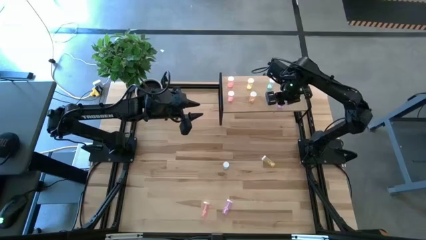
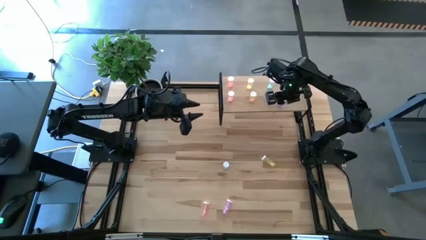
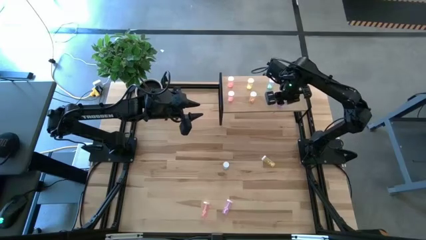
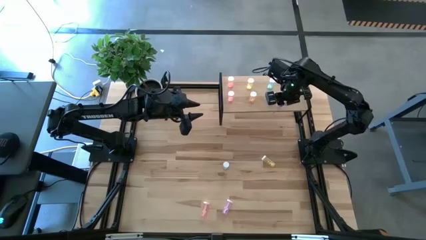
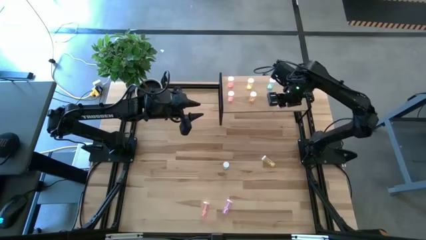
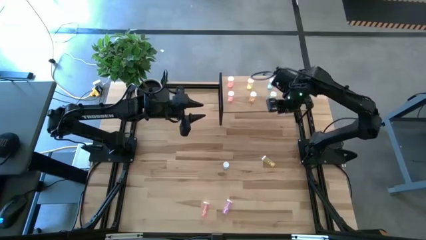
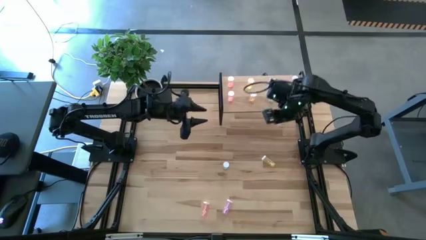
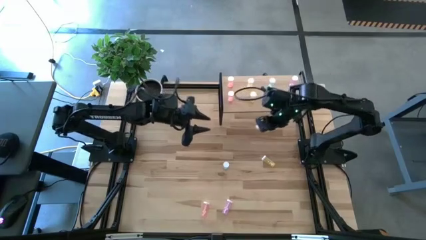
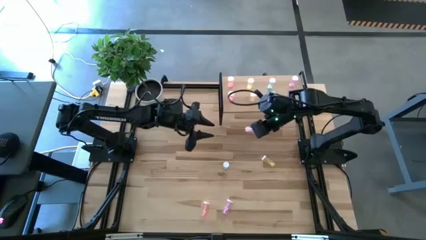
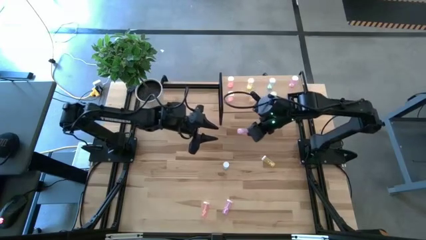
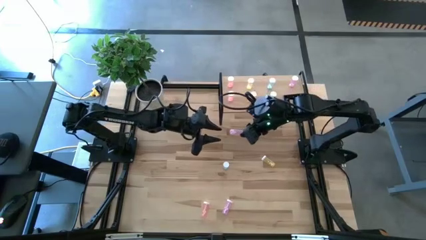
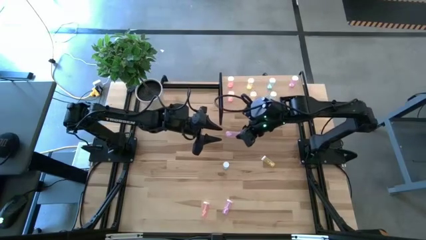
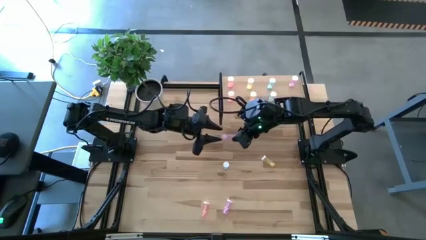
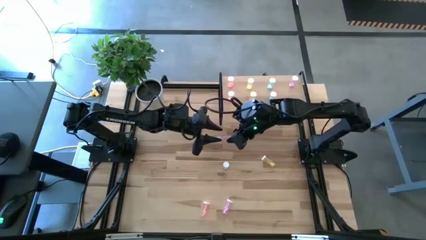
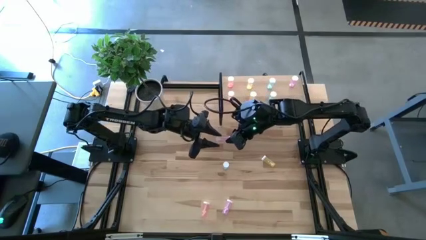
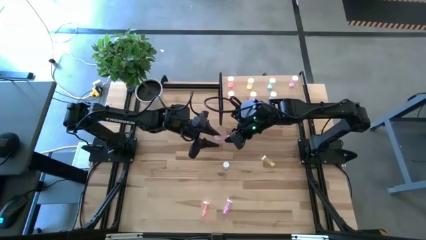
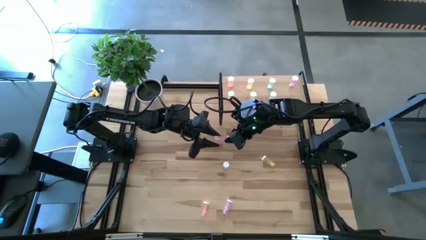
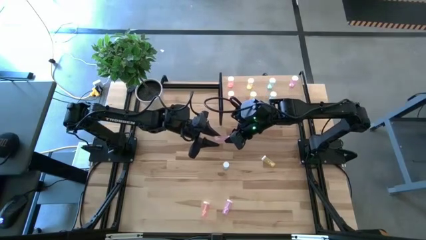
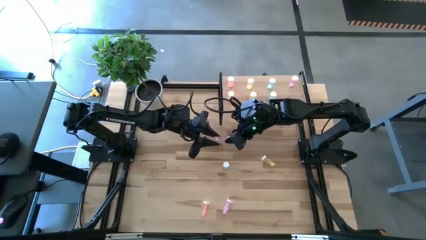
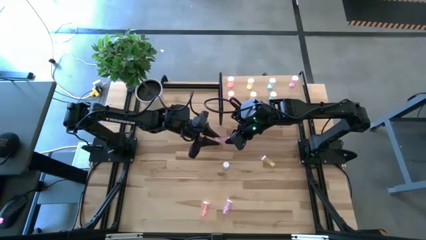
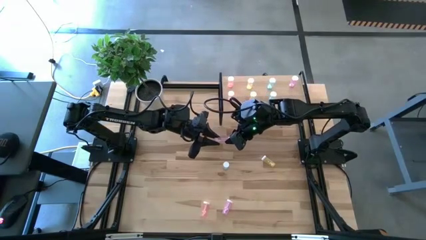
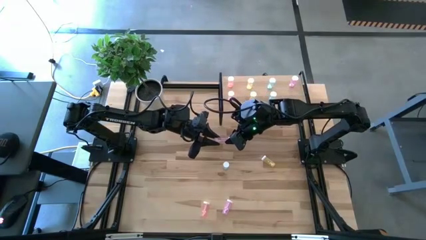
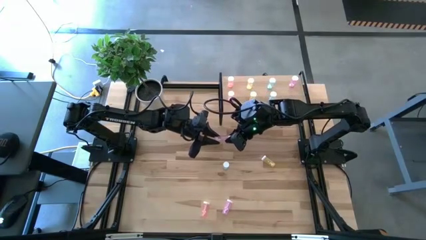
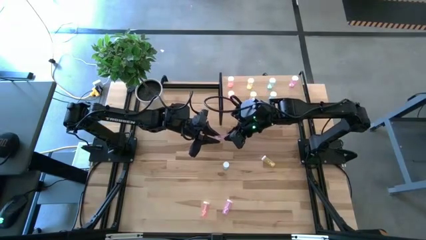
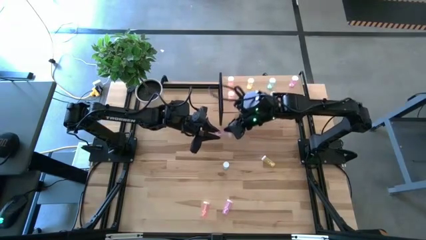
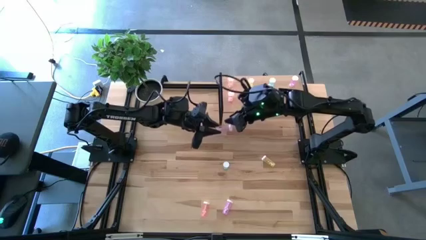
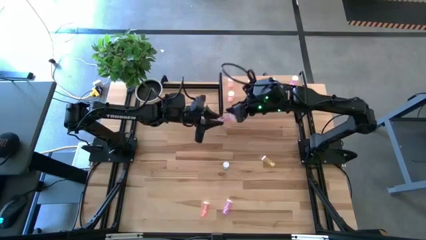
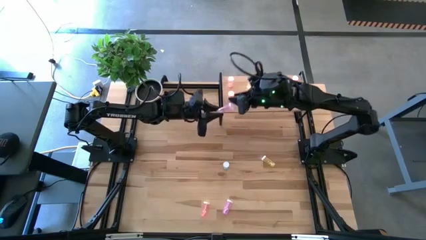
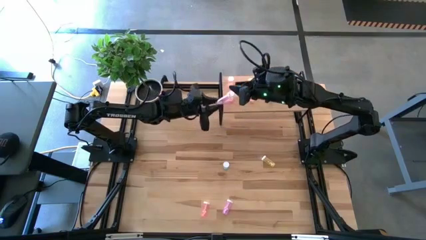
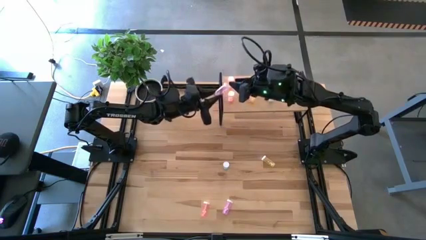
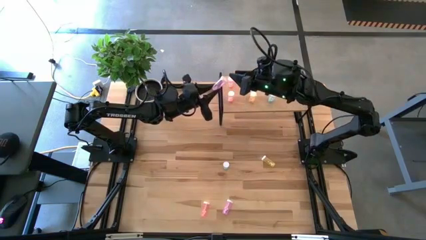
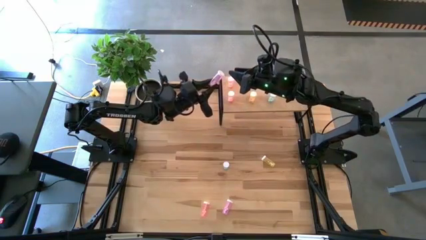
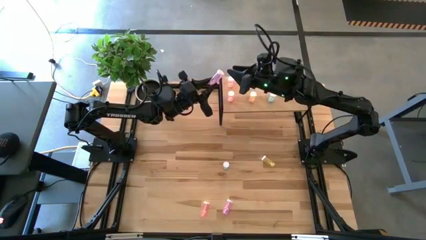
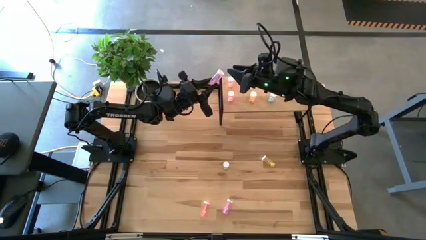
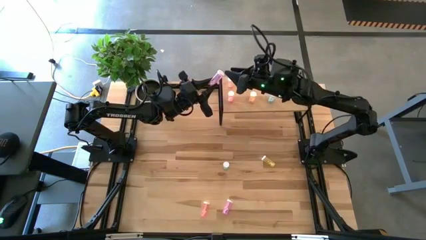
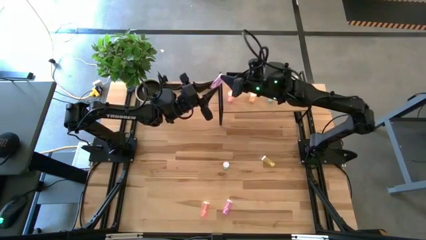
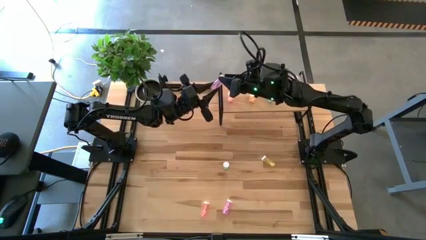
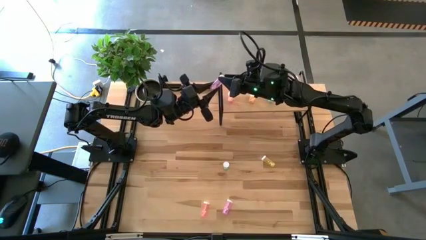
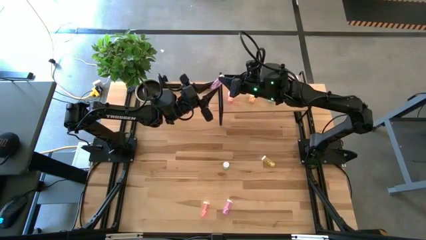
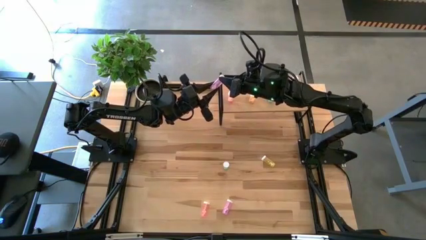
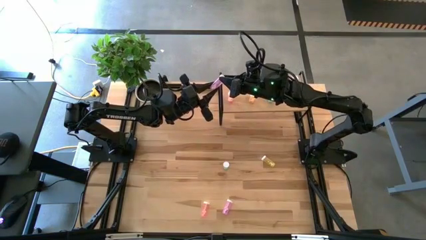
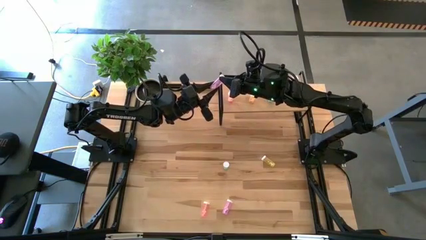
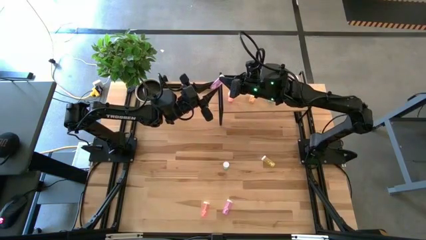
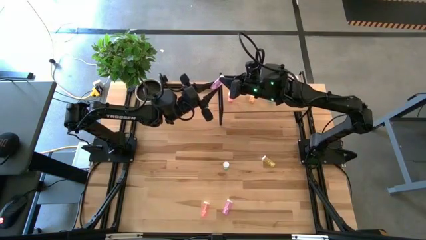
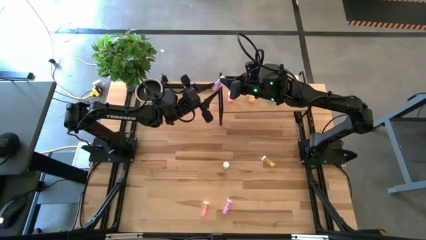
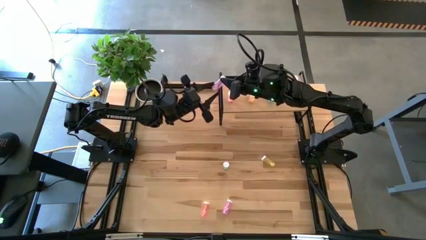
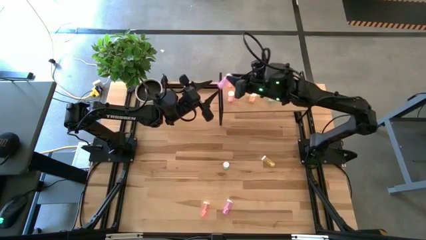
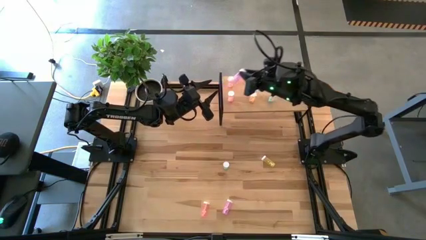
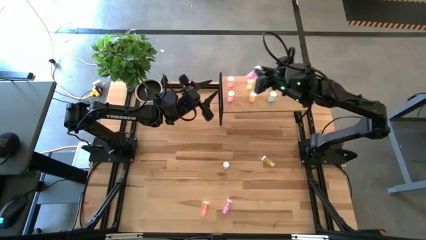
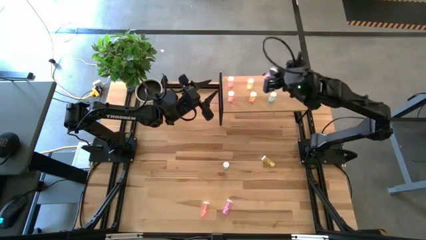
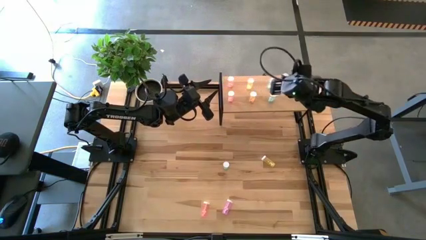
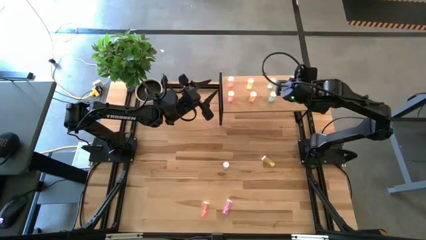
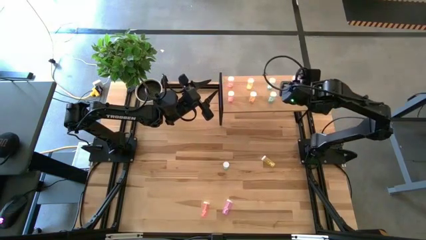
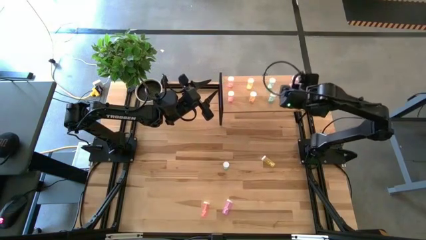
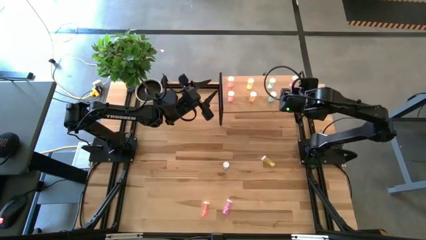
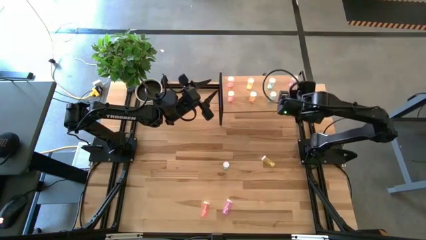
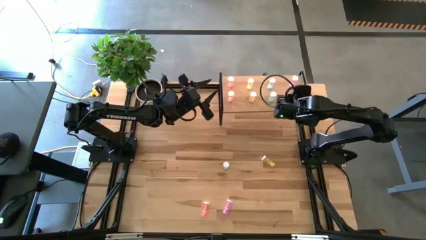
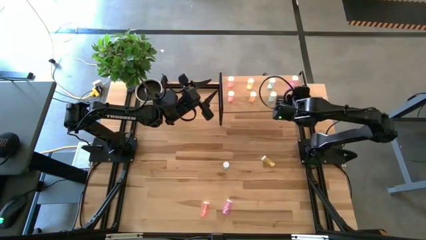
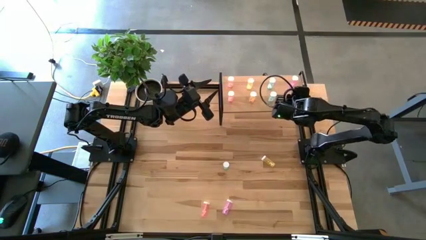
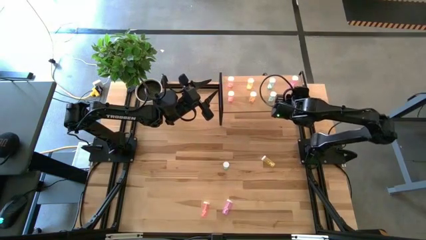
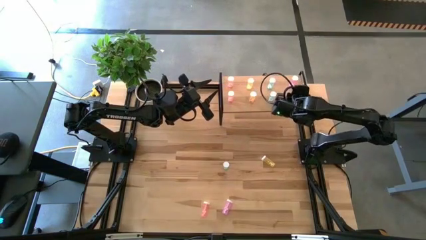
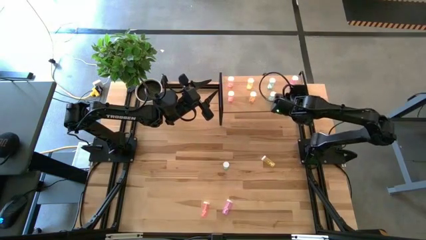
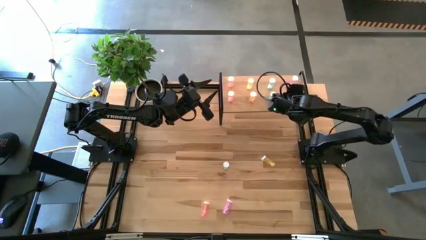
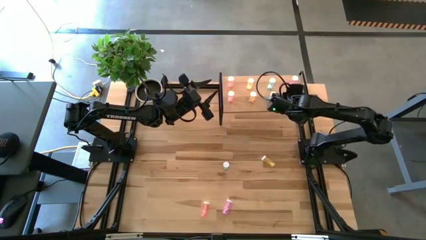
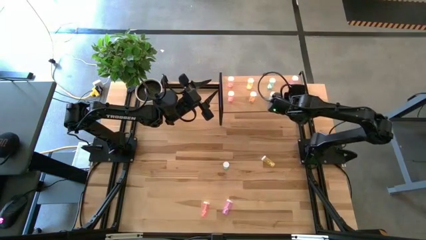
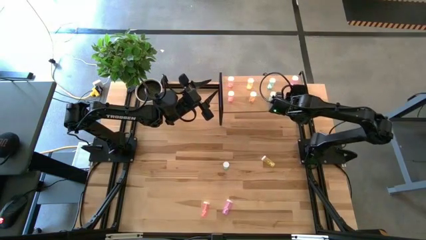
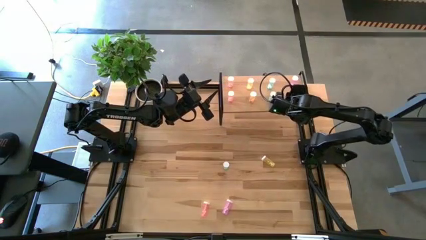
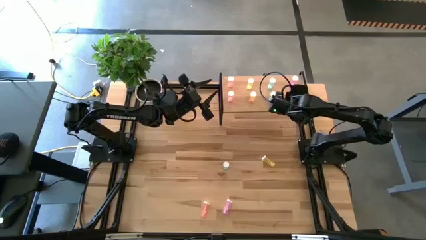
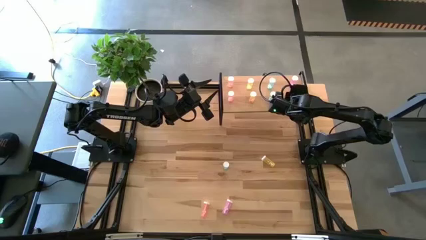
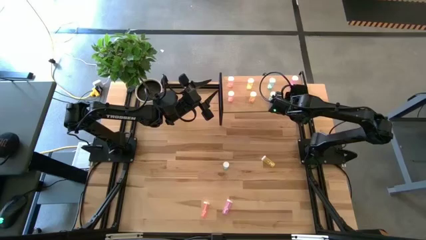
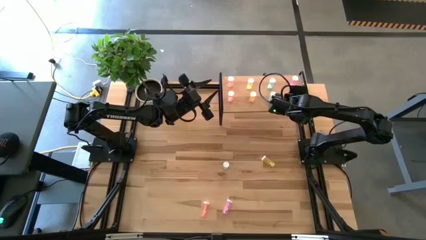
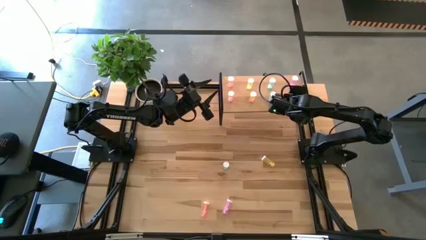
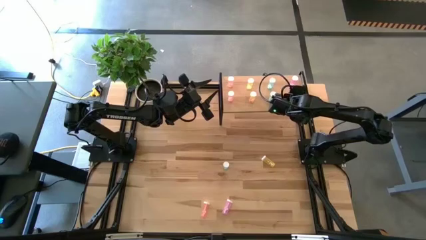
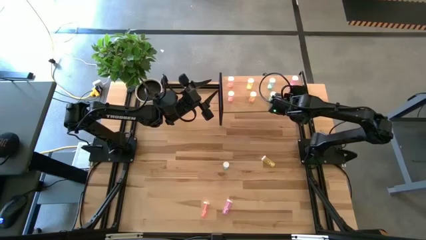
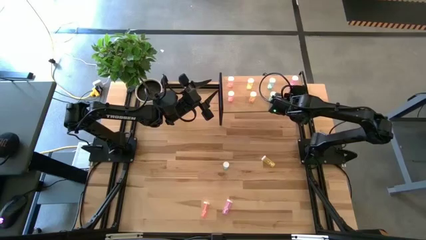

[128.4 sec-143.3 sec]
Task: Pick and place medicine bottles onto shelf by color
Put the top purple pill bottle on the shelf aligned with the other purple pill bottle

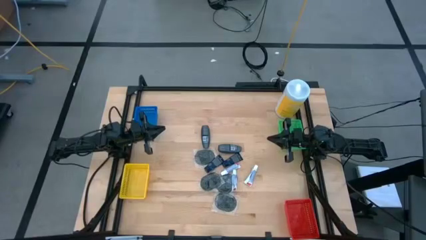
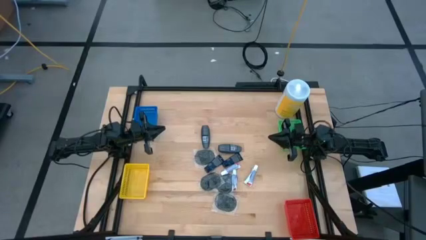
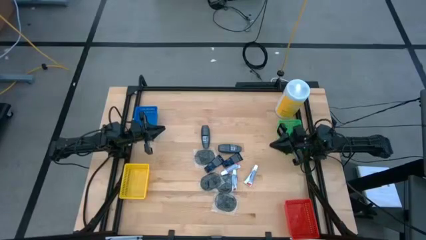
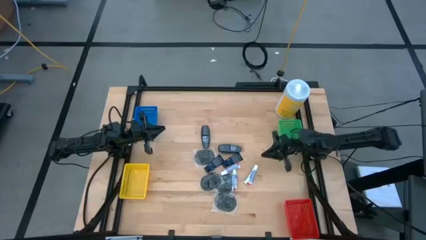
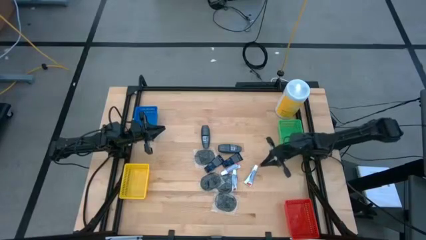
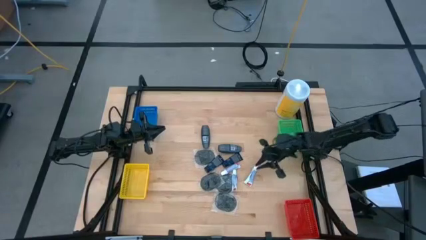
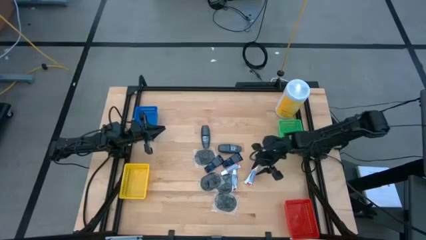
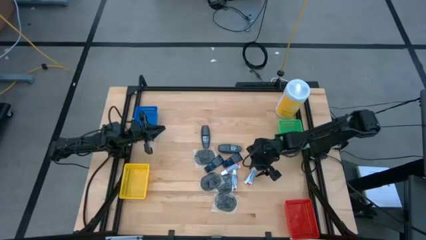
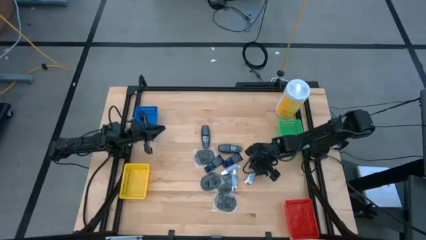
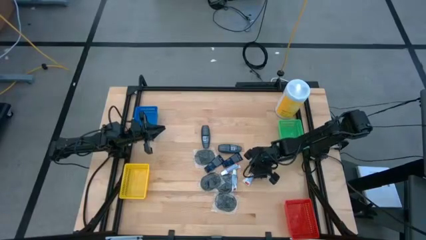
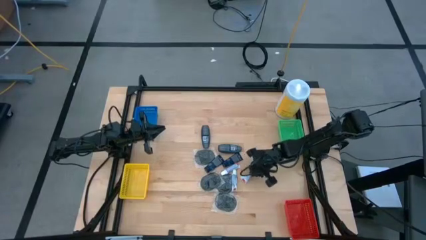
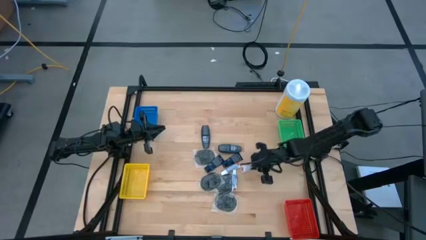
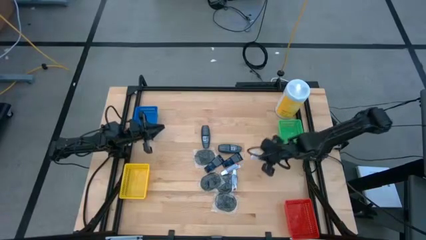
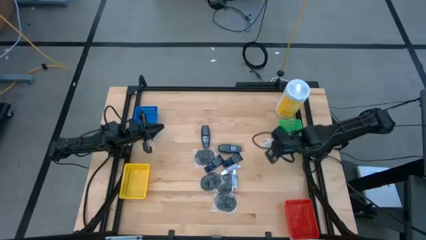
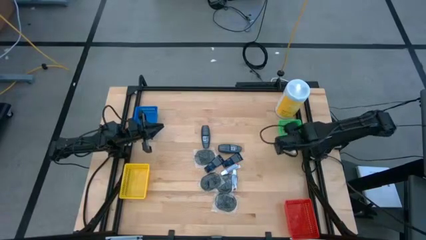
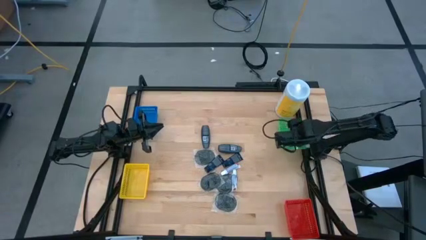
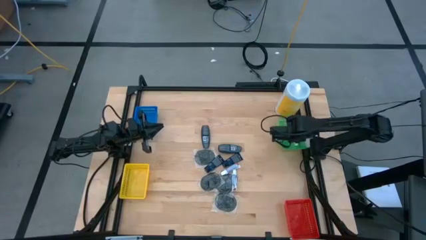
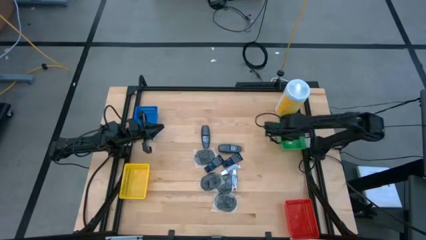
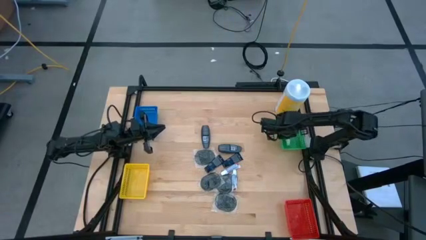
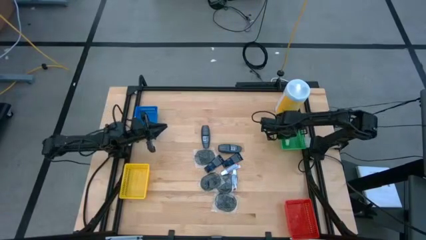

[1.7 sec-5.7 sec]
Task: Pick & Place Travel size toiletries
Put the white toothpaste into the green bin
